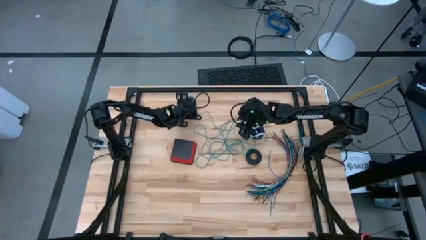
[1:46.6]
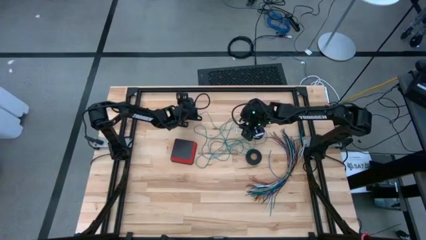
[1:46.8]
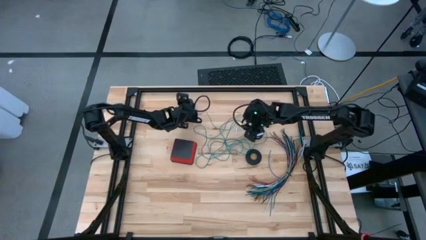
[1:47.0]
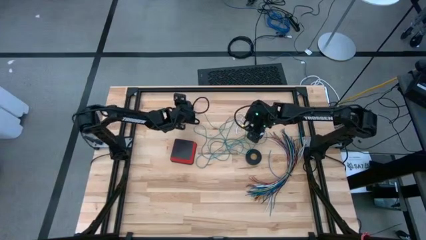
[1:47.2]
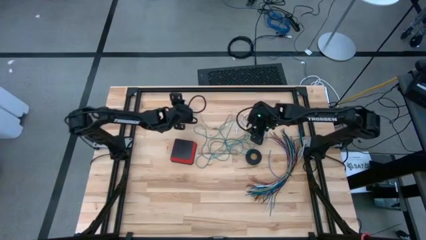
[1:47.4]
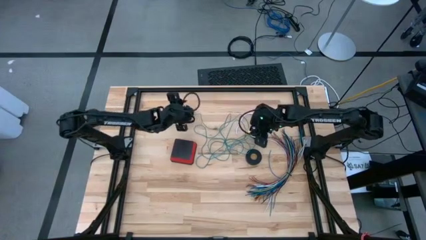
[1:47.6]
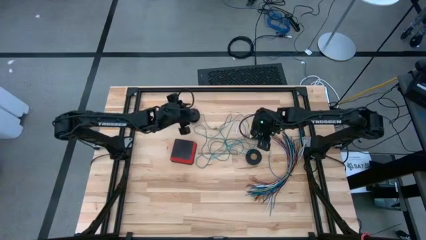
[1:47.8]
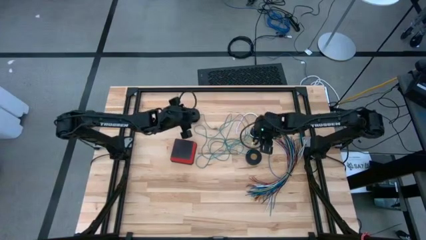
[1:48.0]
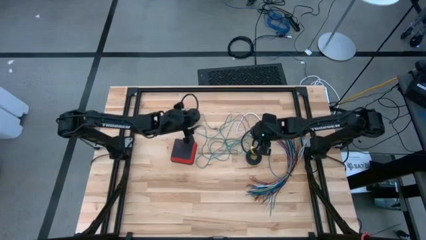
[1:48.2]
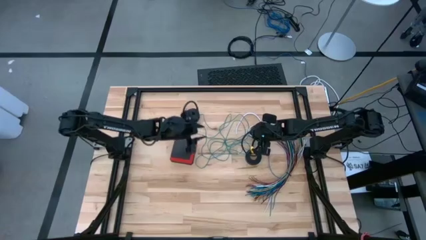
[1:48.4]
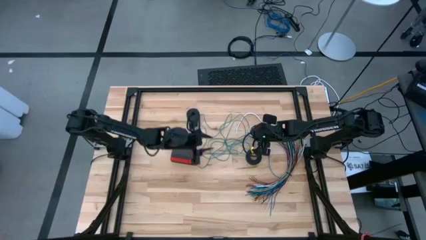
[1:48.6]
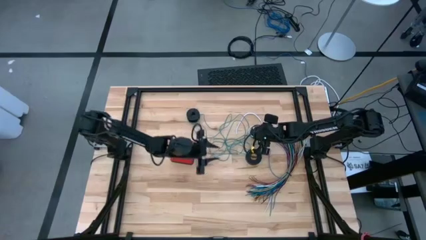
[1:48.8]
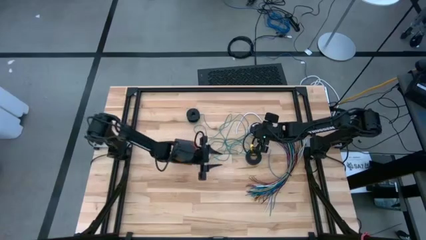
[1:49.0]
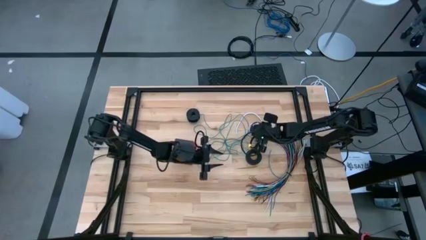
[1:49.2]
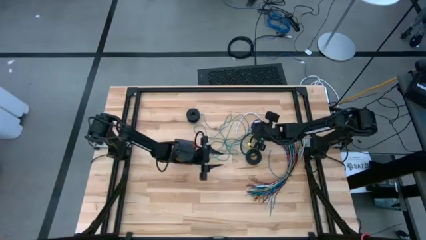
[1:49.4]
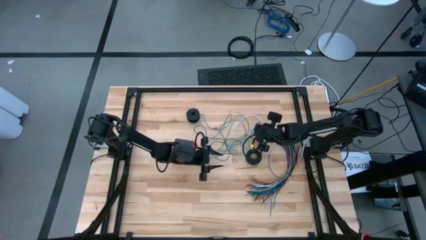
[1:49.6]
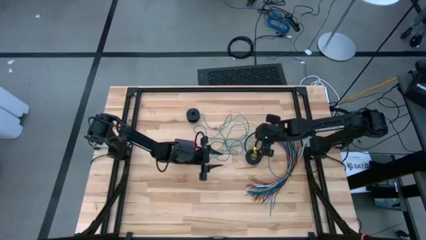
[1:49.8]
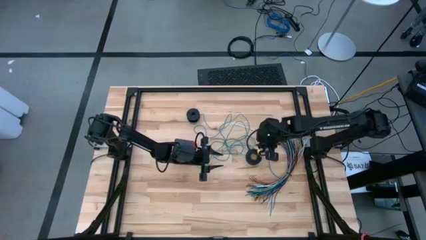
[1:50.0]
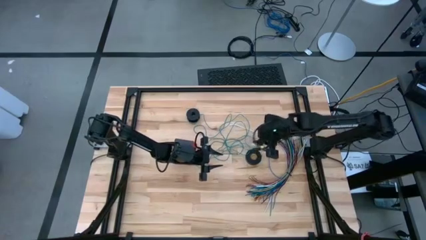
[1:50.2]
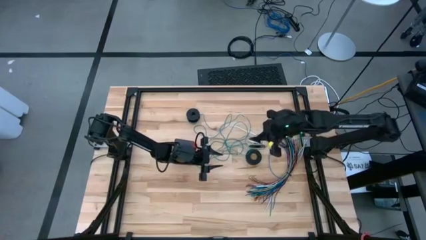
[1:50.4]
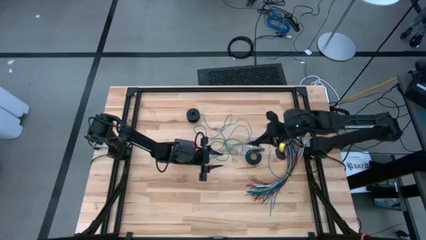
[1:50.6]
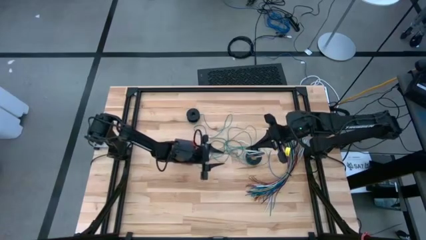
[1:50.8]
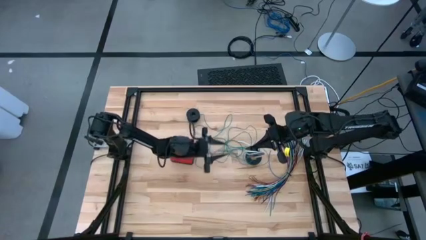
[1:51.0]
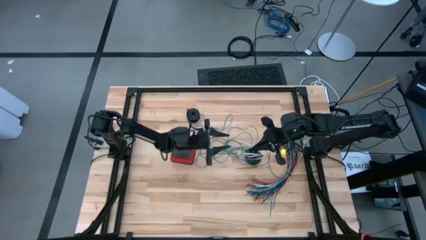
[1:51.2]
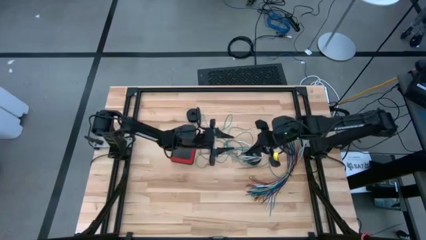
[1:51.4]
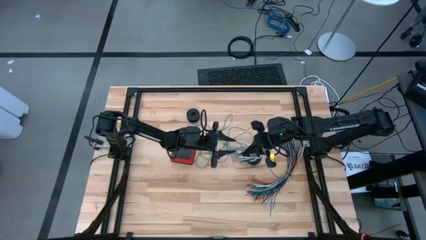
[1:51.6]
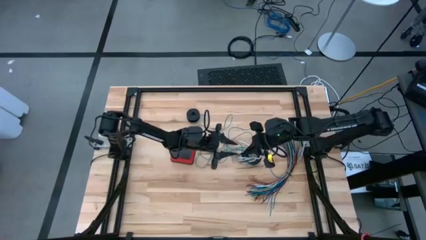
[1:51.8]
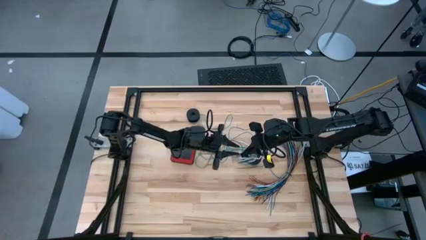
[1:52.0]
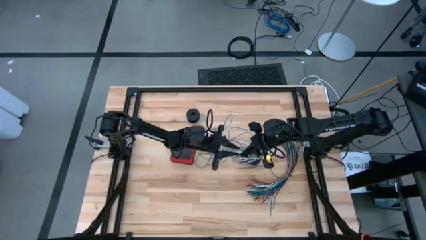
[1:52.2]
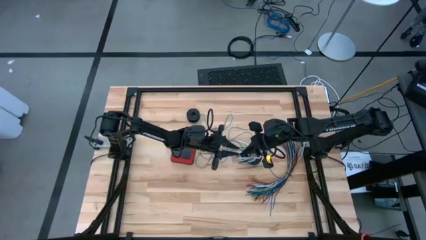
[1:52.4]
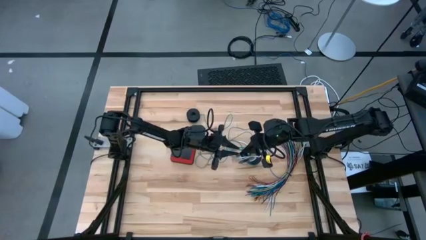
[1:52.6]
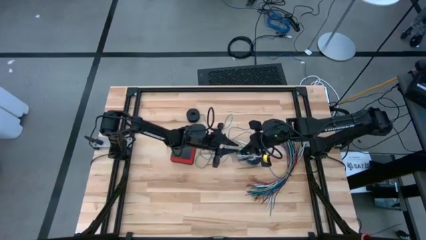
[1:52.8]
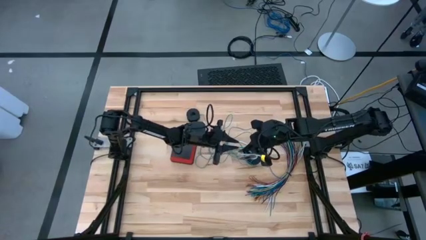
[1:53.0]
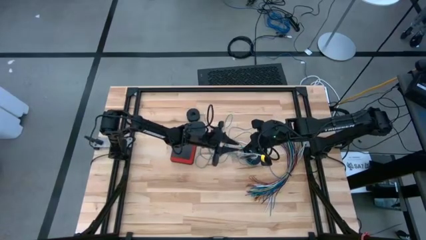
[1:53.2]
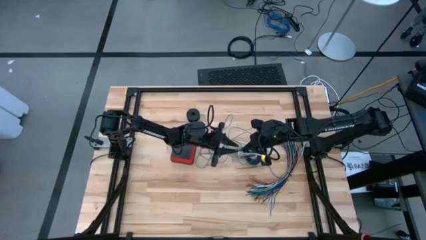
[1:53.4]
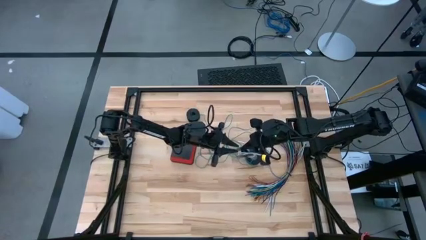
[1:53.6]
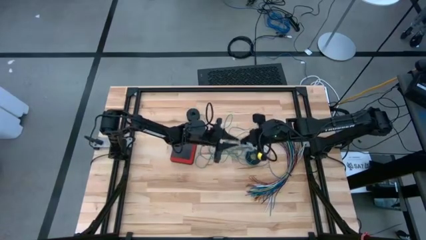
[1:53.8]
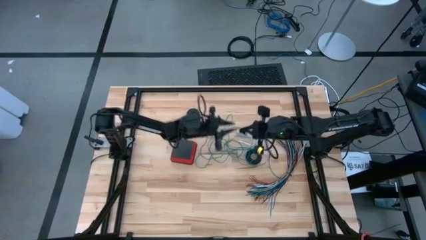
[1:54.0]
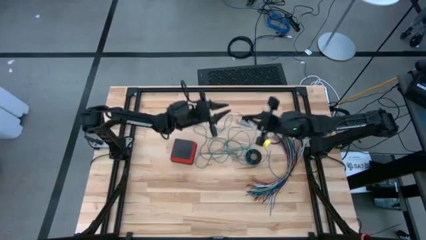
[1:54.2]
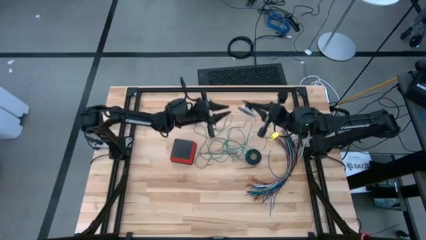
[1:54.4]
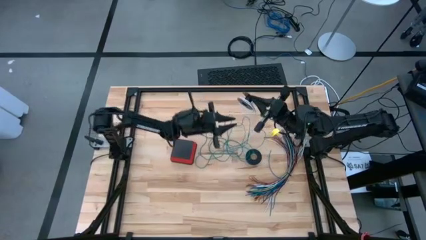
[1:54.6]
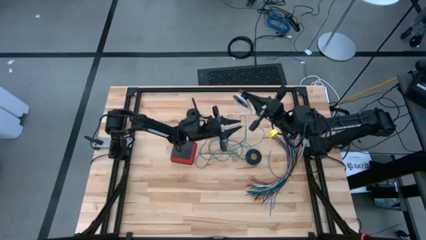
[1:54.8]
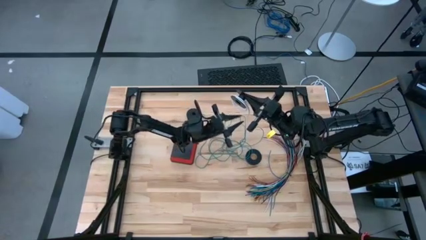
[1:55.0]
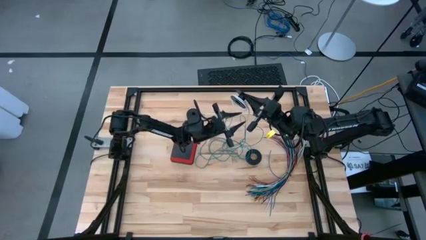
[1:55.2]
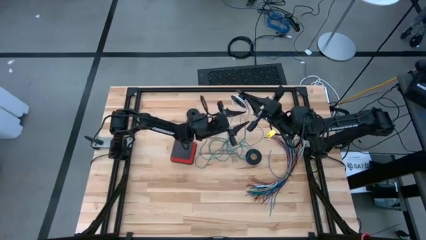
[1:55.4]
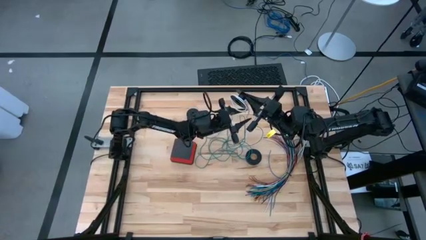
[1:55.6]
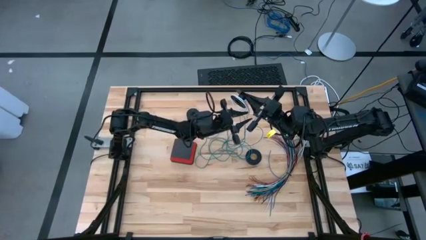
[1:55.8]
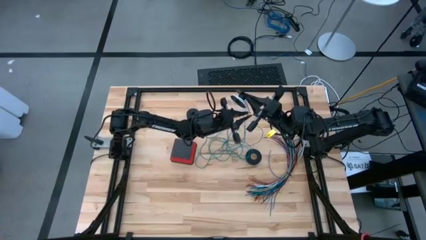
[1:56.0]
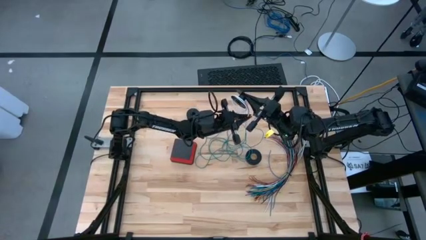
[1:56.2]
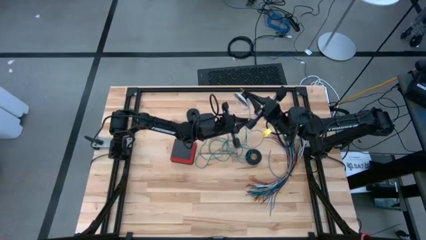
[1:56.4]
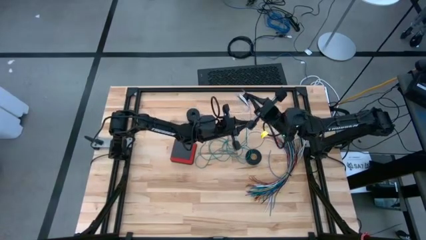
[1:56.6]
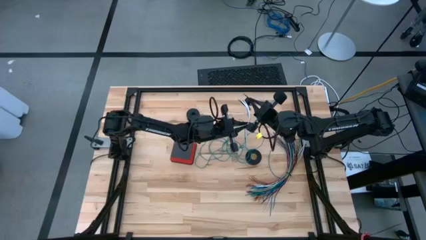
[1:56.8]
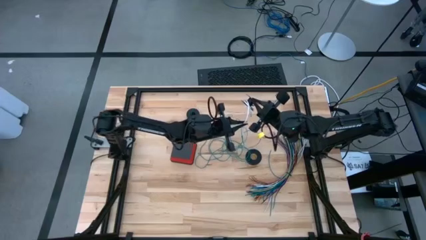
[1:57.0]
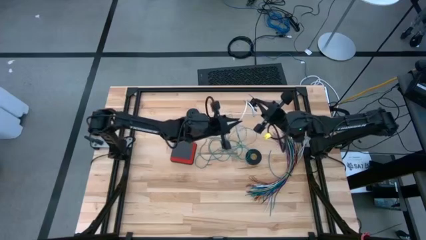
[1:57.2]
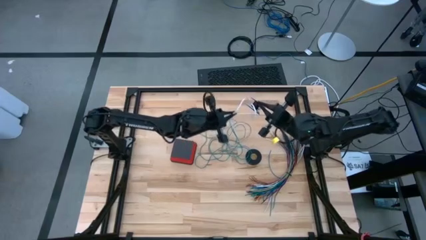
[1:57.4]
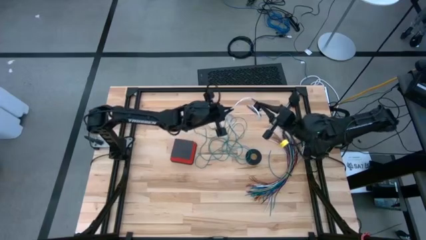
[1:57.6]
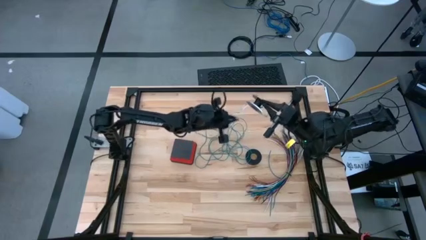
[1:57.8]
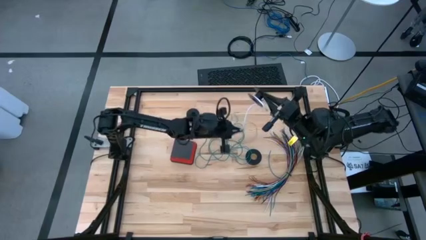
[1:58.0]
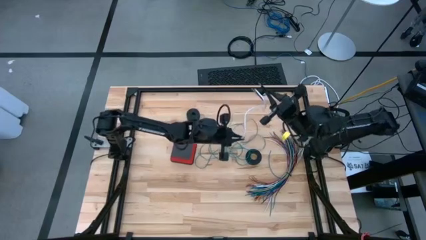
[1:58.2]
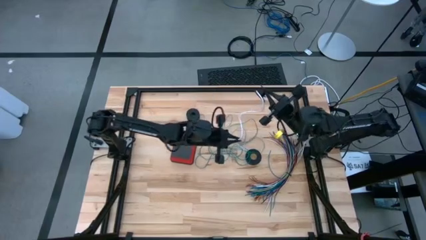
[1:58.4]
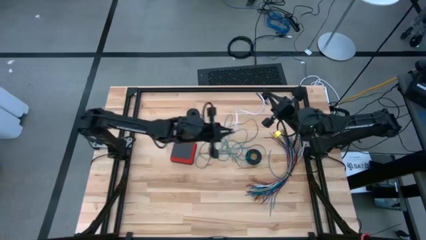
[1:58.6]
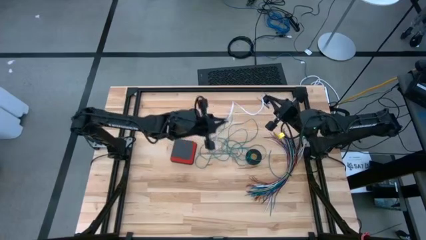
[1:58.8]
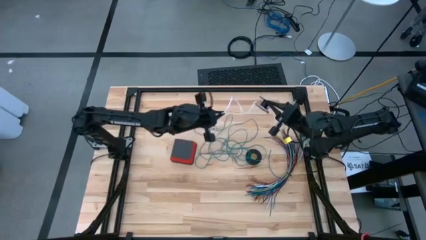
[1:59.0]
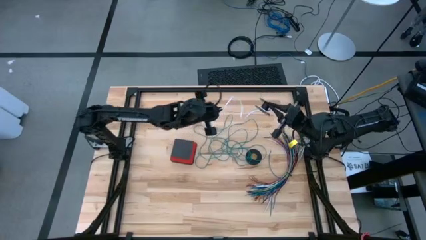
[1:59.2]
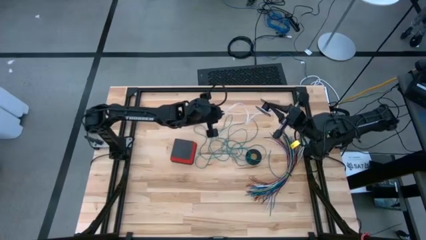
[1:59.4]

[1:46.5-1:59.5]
Task: Coiling cords
Uncoil the white wire cable from the spool

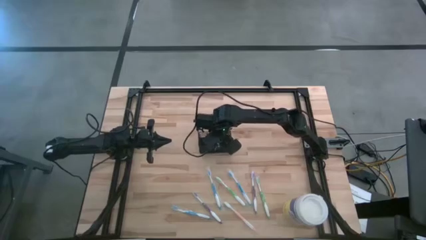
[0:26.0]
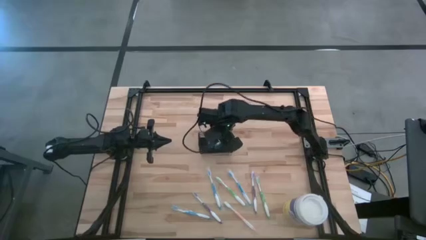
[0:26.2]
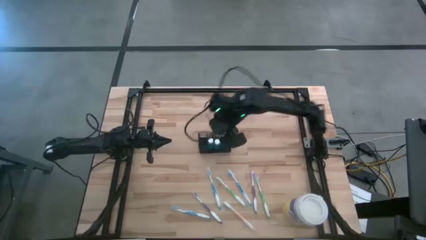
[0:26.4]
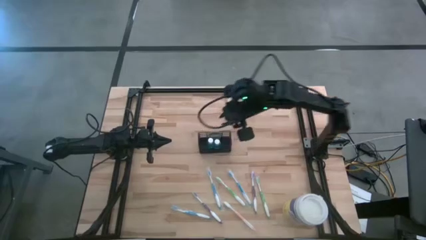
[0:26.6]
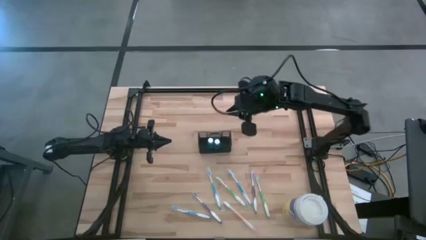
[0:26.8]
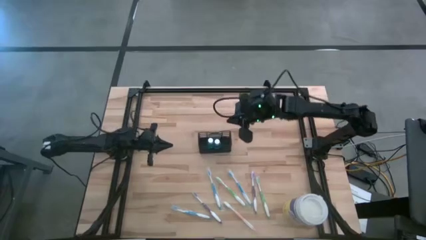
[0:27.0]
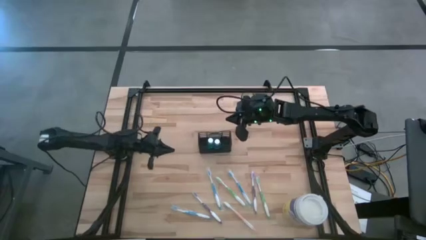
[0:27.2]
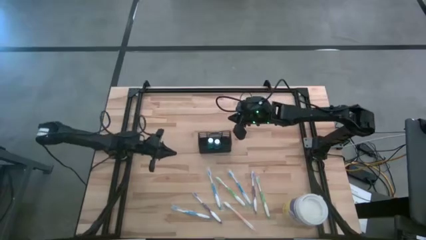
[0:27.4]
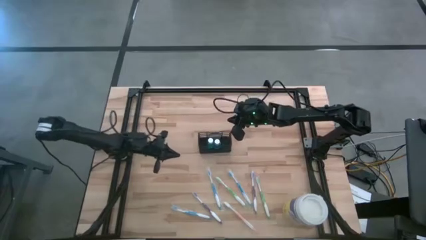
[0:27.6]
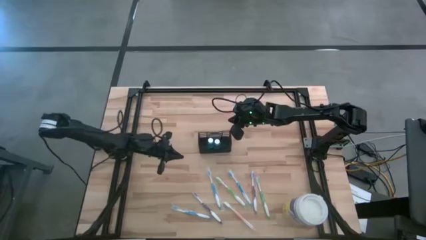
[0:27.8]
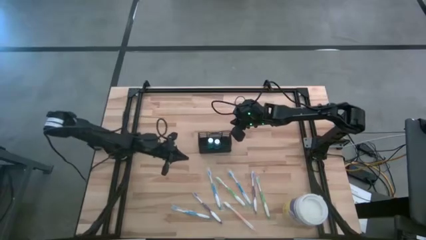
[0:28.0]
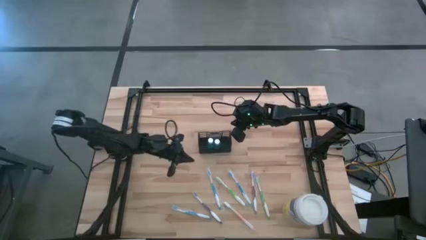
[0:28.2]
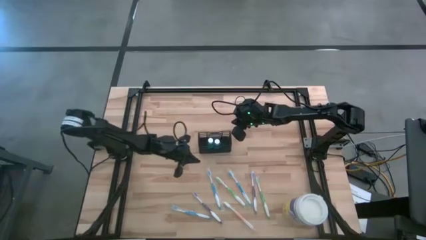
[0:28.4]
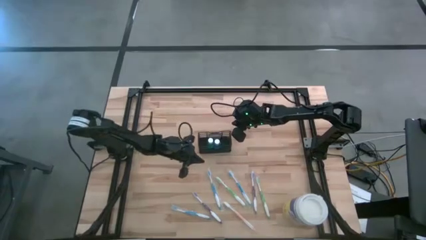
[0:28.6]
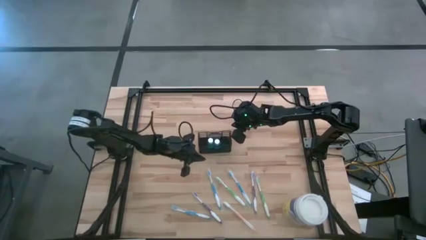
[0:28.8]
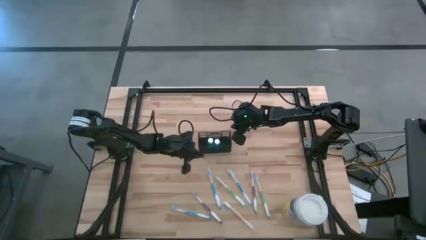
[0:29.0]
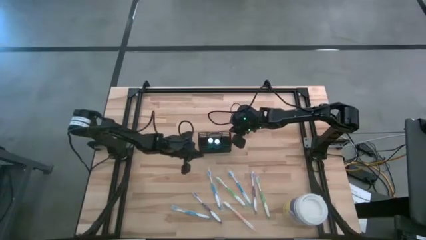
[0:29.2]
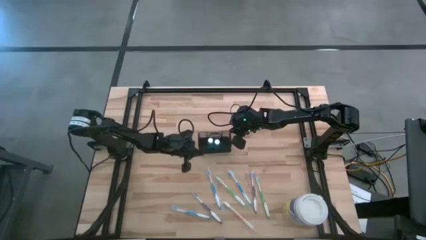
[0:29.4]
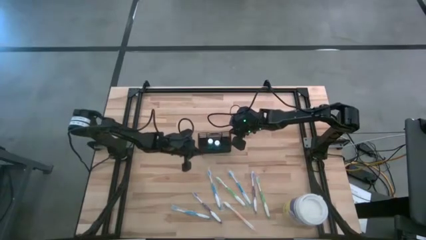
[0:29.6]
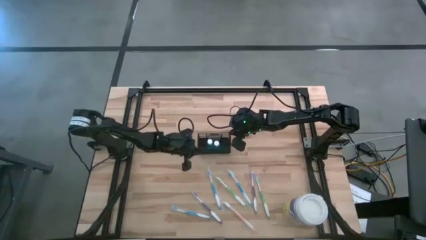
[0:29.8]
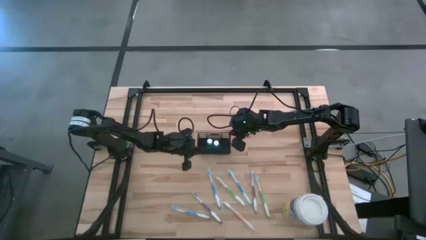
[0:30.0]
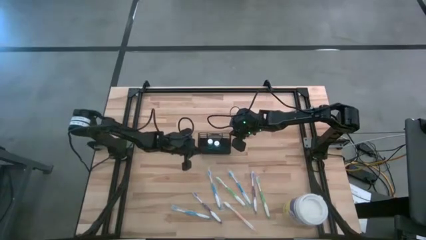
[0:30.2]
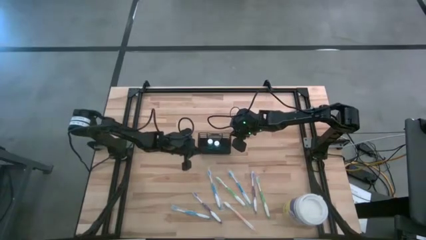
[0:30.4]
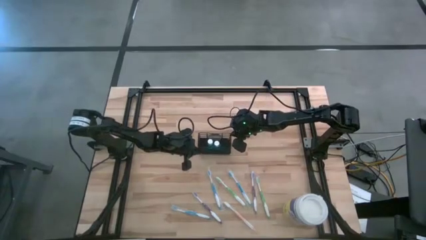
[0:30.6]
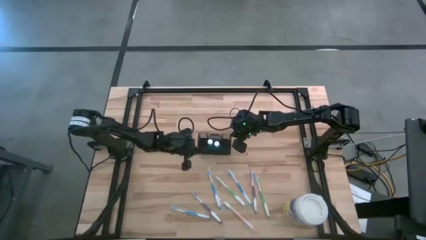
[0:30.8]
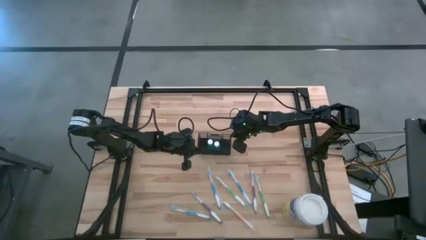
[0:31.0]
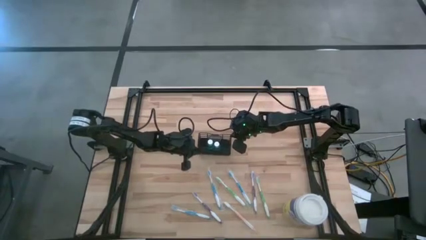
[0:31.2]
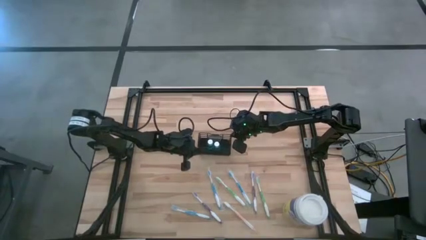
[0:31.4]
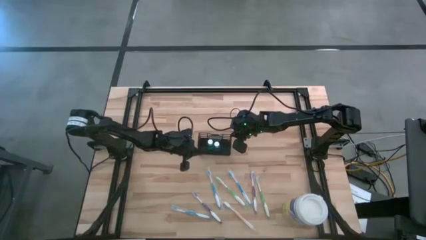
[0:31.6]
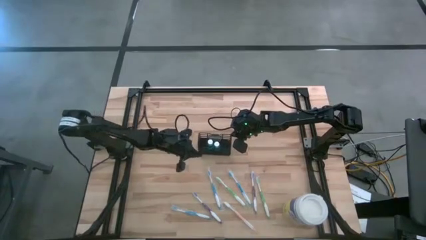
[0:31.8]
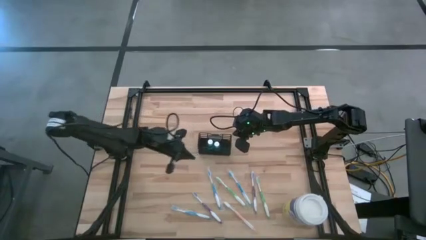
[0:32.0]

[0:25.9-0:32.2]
Task: Pick & Place toothbrushing station
Adjust the black wire organizer
